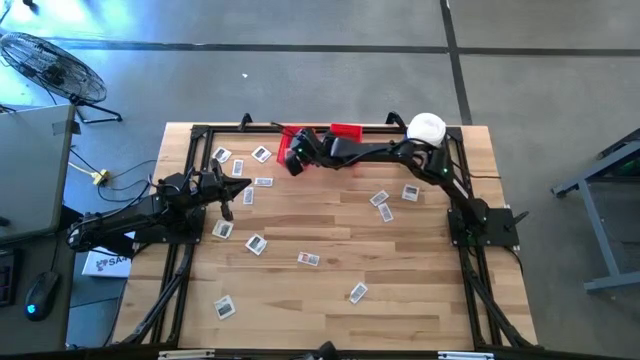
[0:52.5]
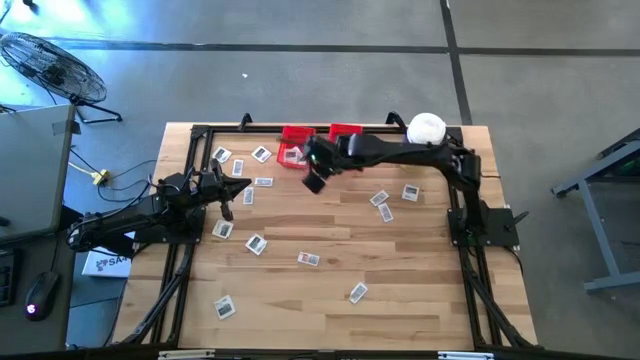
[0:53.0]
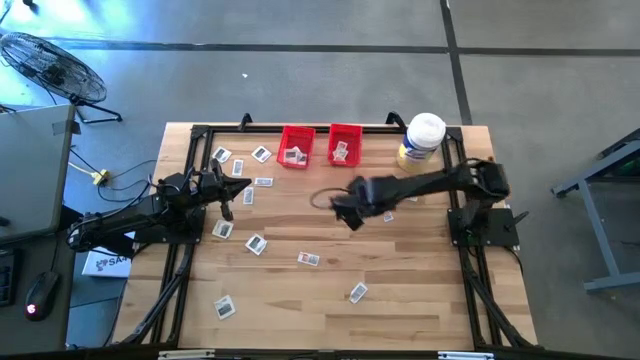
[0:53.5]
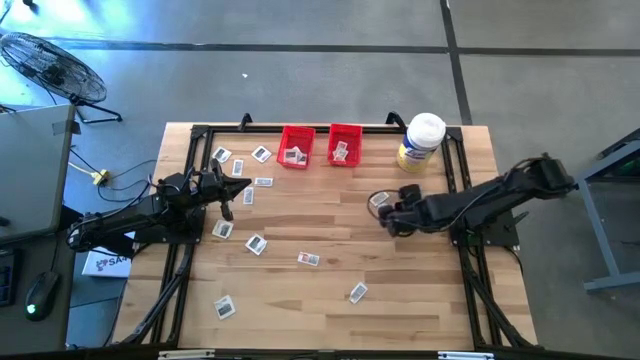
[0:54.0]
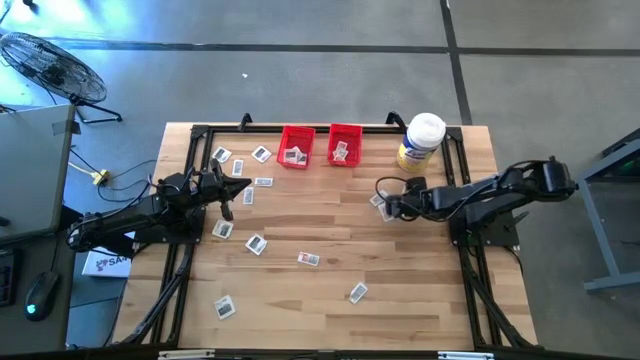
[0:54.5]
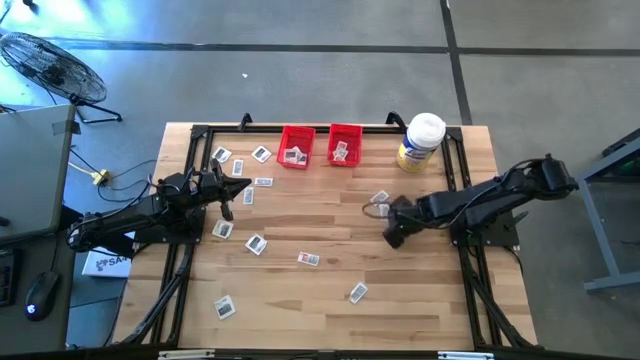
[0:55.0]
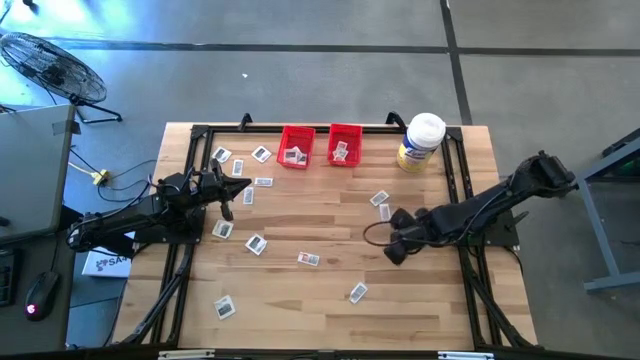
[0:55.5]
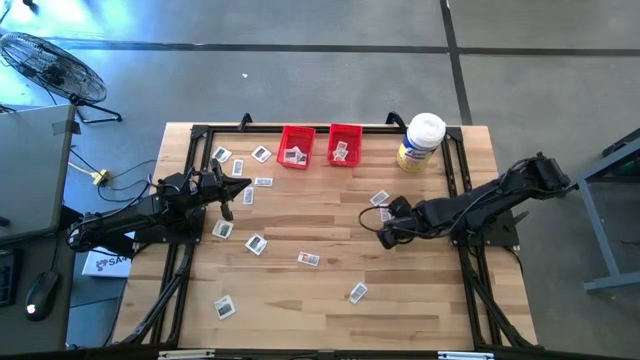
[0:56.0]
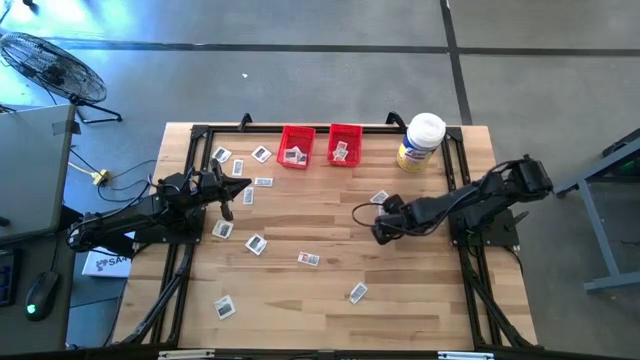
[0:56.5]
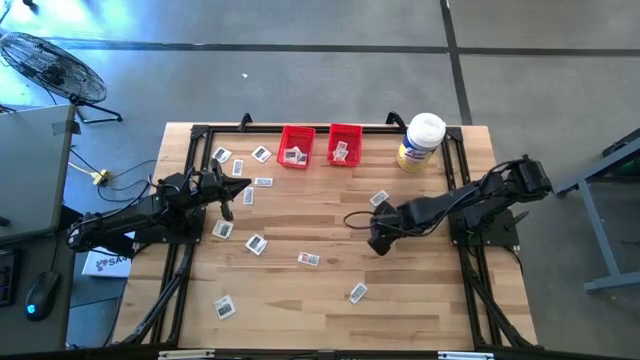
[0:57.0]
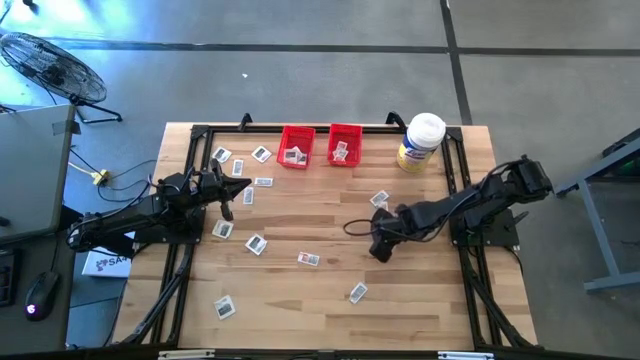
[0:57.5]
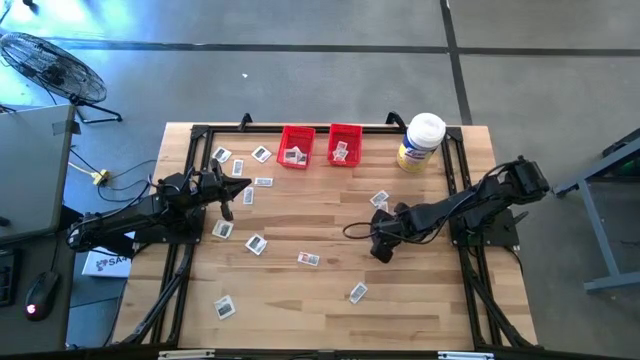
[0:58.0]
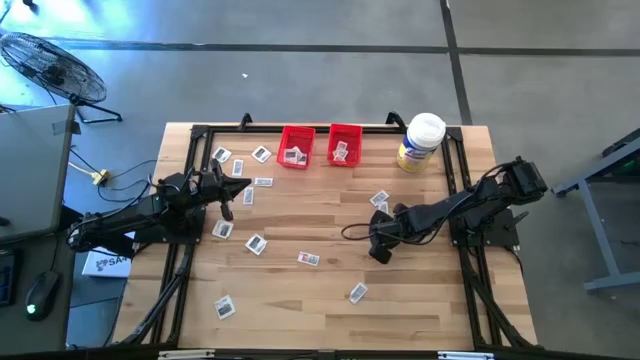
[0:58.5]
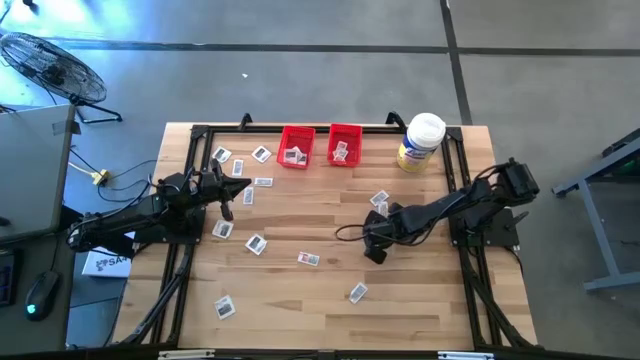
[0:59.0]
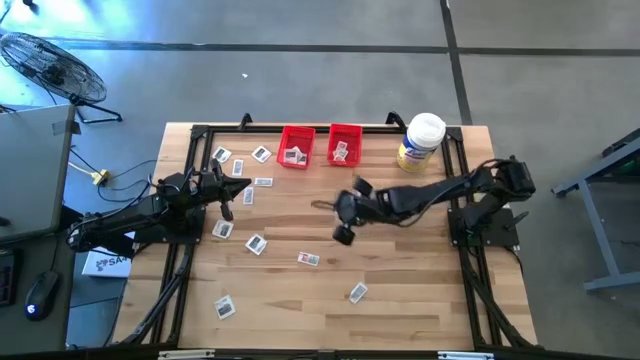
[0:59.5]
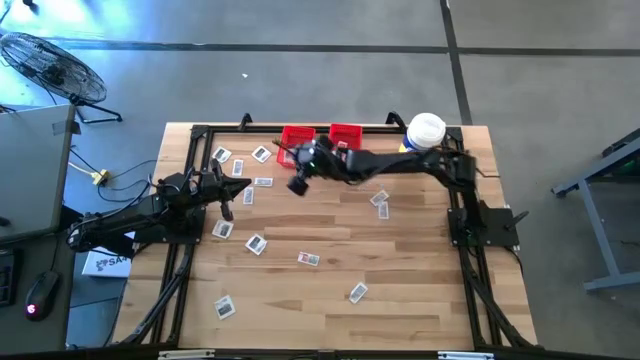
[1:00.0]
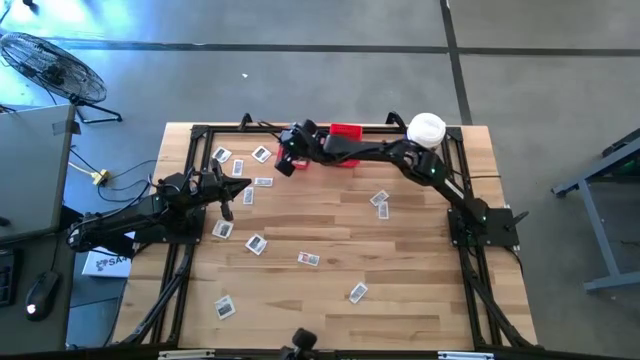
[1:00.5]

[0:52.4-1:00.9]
Task: Pick & Place First Aid Supplies
Put the towelette pack into the left red bin

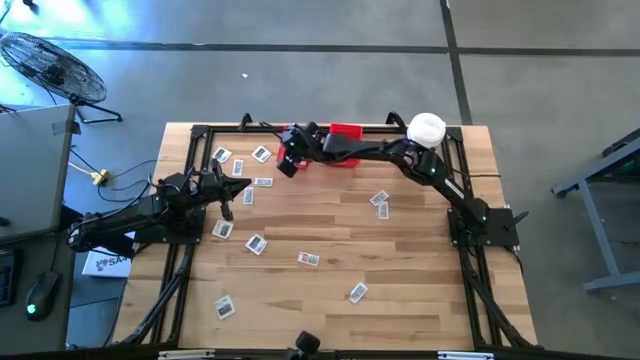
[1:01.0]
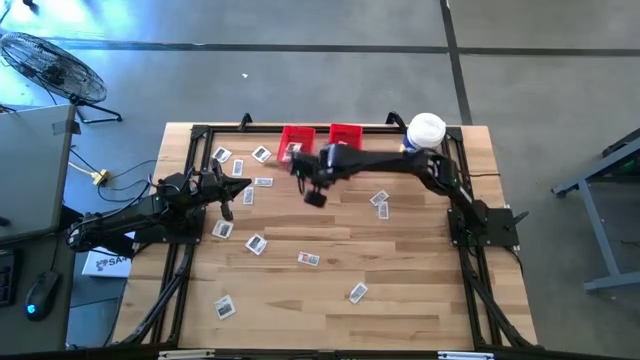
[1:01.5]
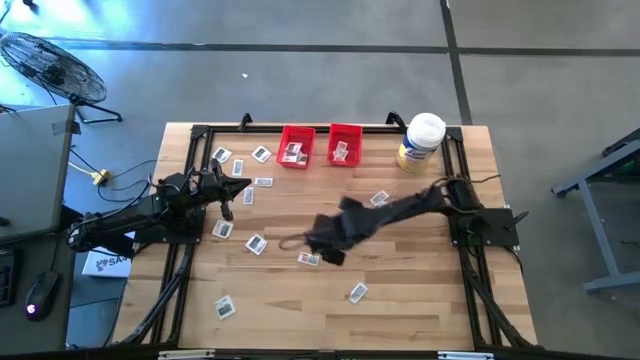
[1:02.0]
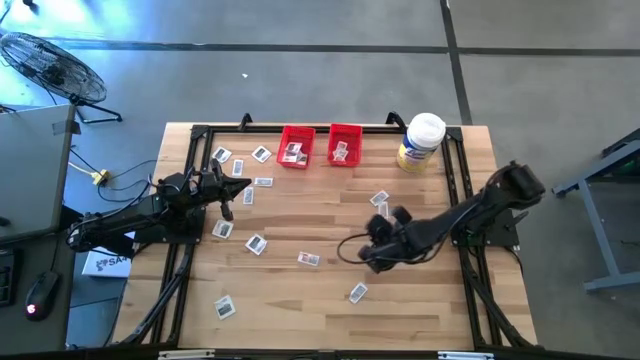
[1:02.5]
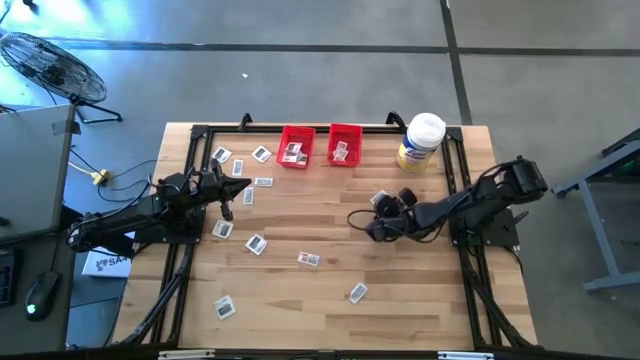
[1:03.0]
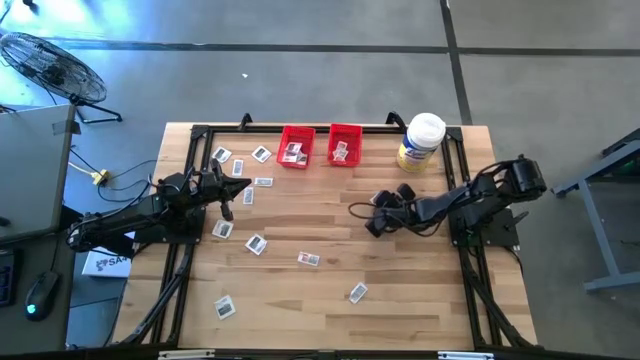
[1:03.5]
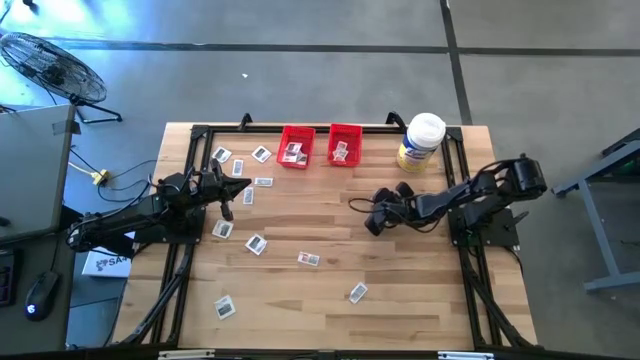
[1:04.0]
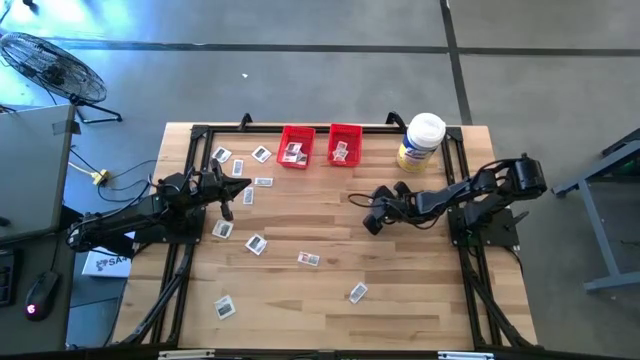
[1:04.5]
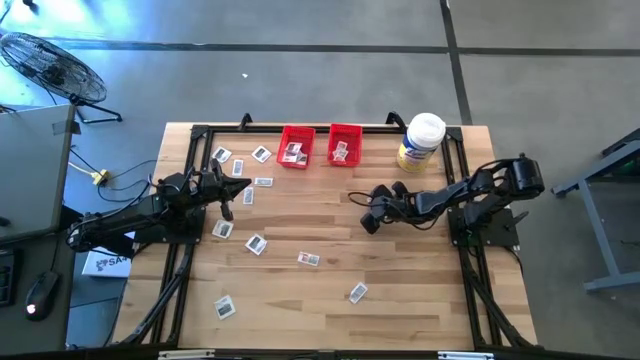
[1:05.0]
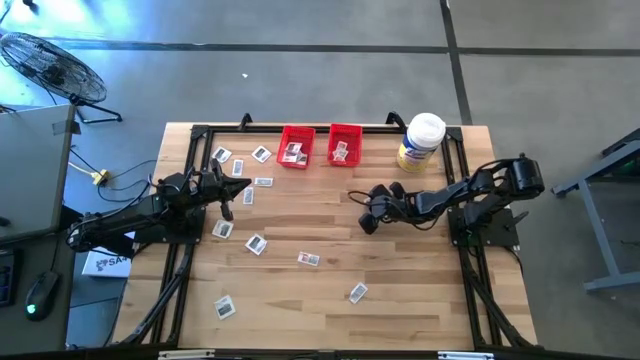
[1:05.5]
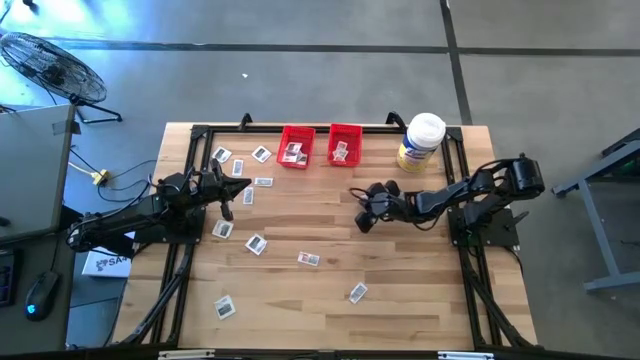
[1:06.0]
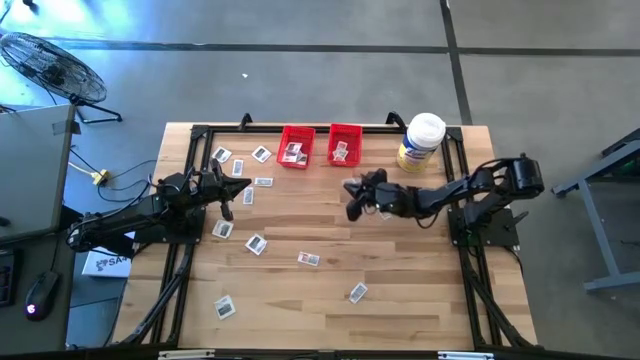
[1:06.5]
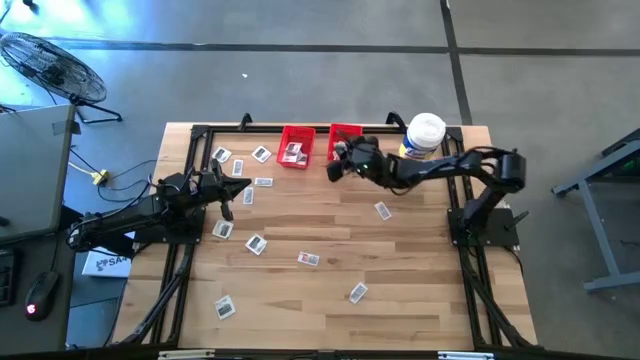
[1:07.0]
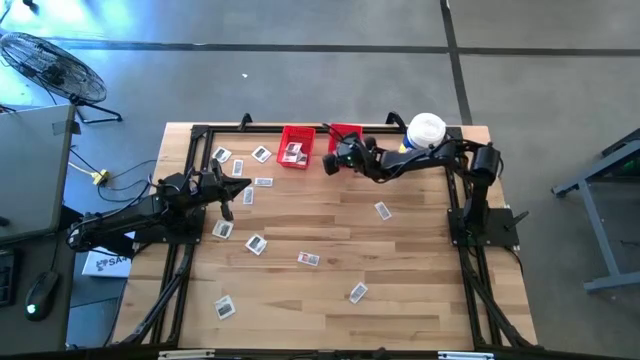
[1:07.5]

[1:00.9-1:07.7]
Put the ointment pack into the right red bin

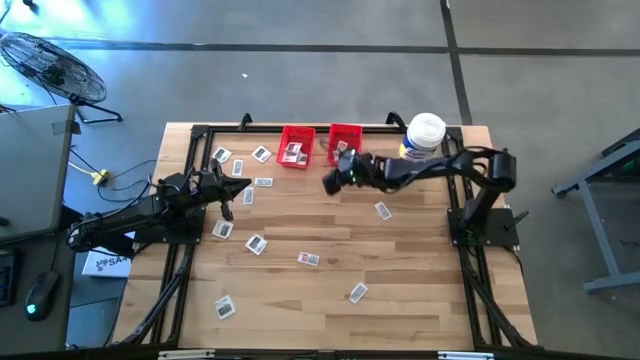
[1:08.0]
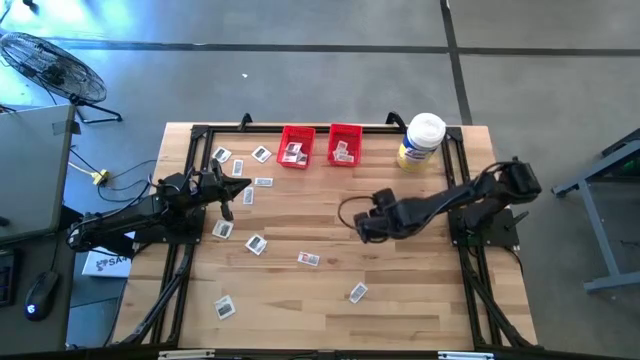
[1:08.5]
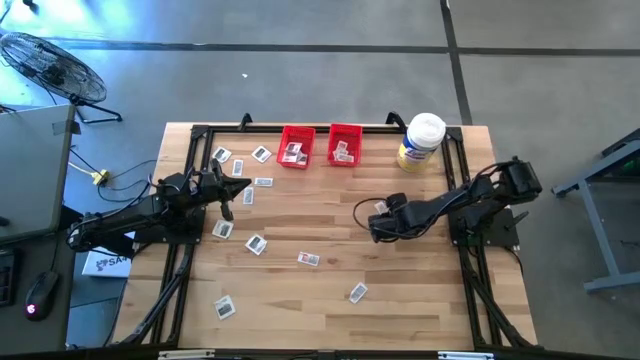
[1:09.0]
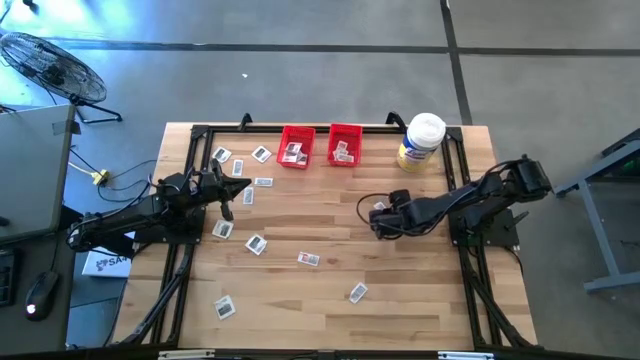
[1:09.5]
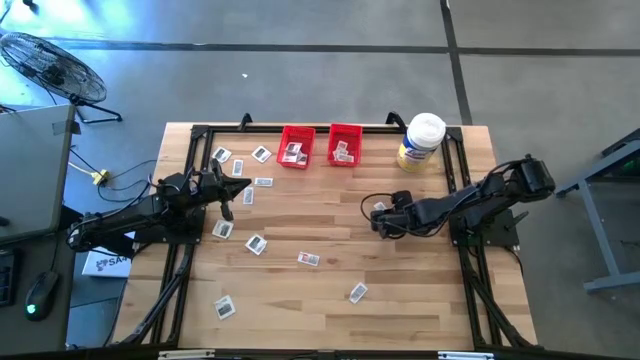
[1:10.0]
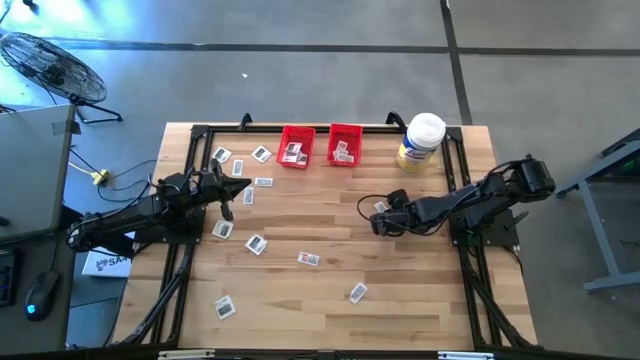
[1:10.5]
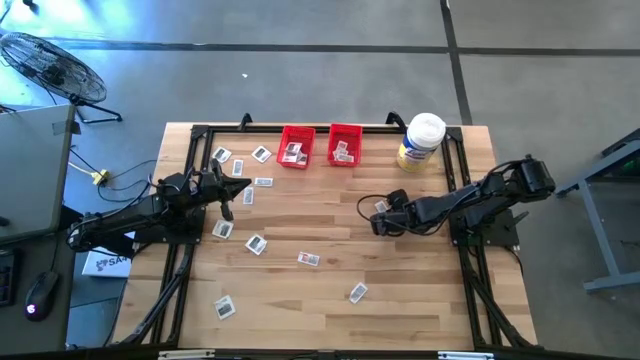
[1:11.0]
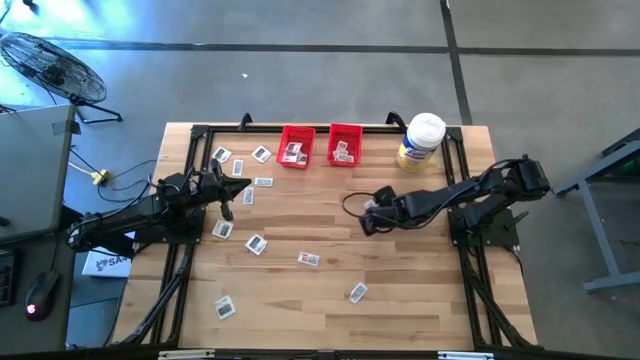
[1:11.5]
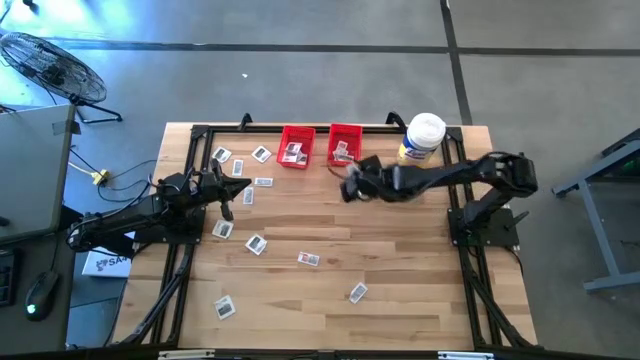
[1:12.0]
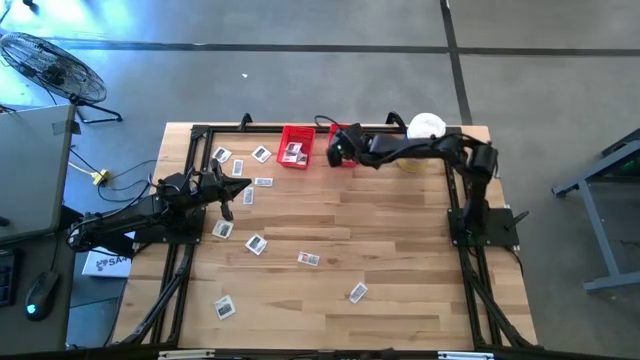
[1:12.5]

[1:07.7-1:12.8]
Put the ointment pack into the right red bin

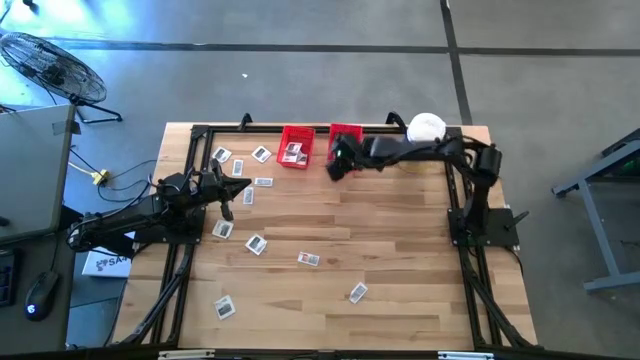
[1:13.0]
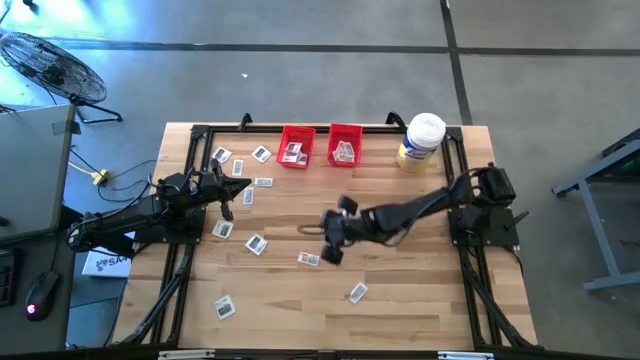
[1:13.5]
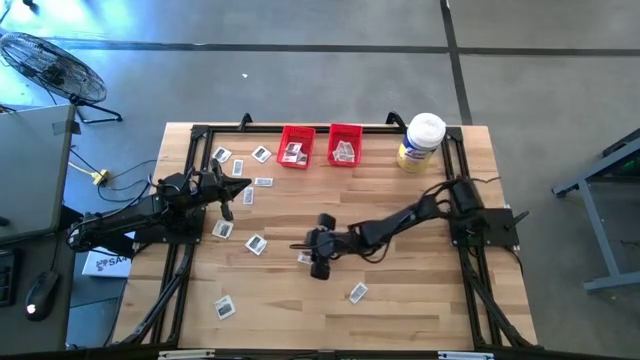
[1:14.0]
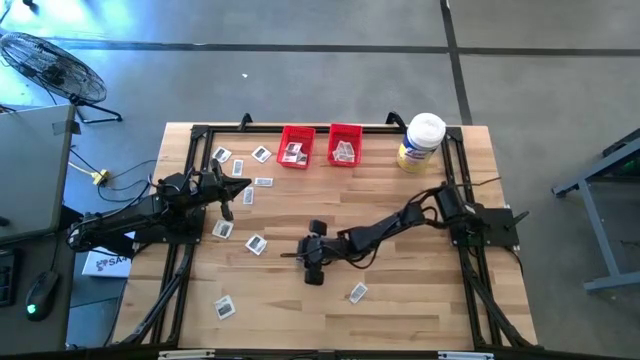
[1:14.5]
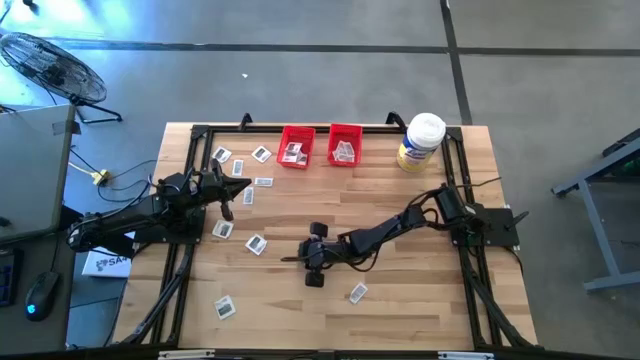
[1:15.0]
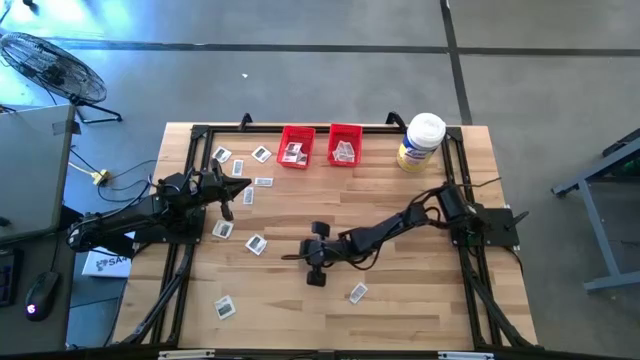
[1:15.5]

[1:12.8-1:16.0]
Put the ointment pack into the right red bin
